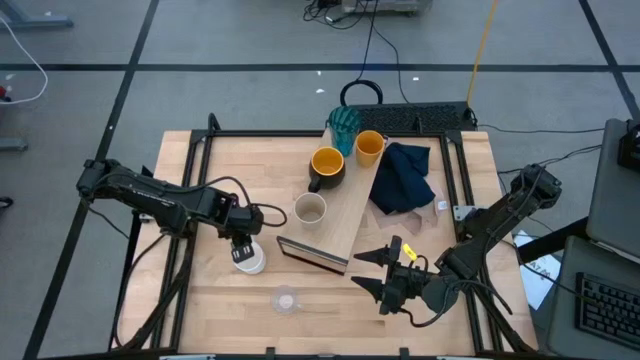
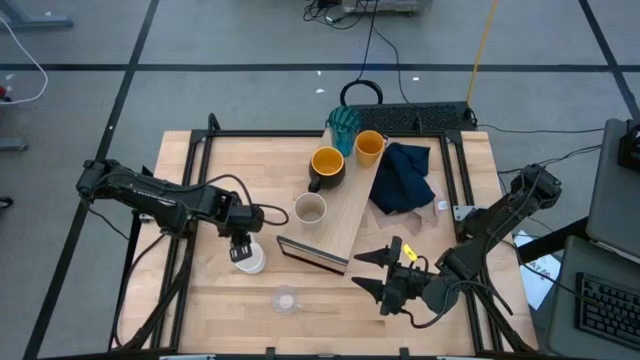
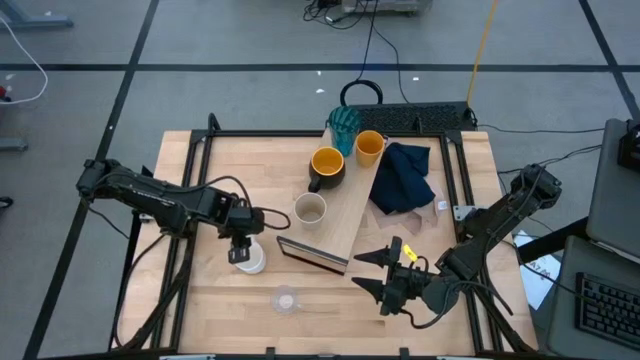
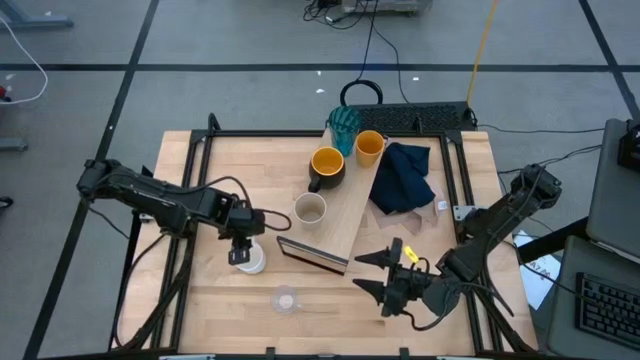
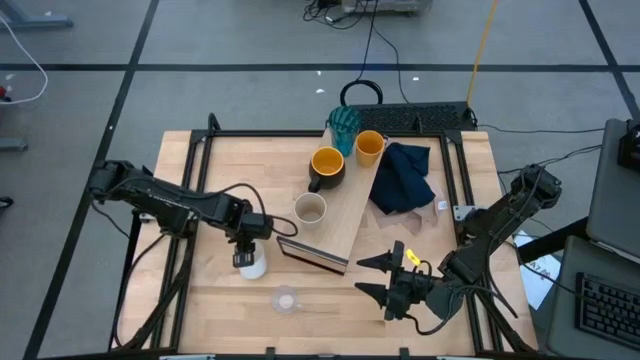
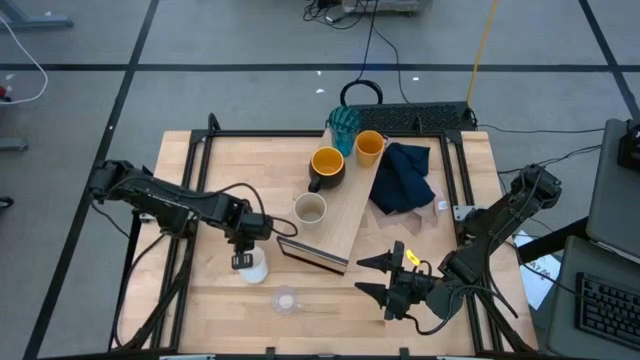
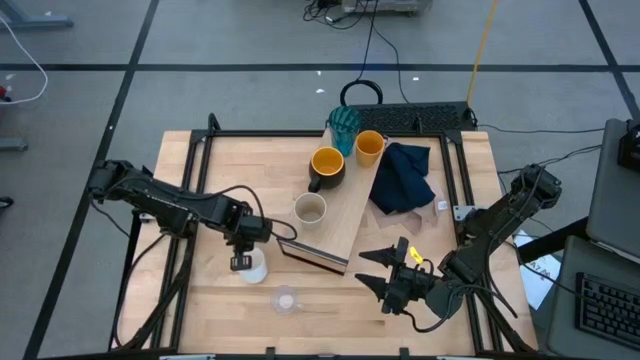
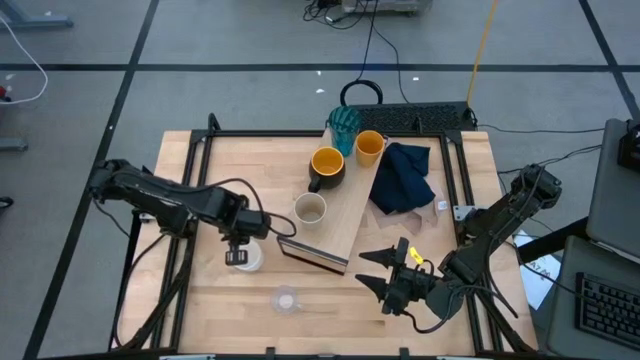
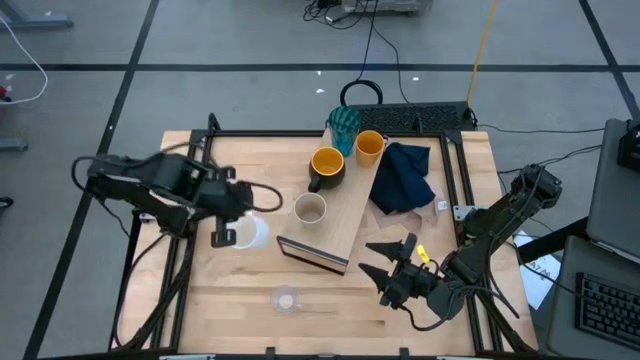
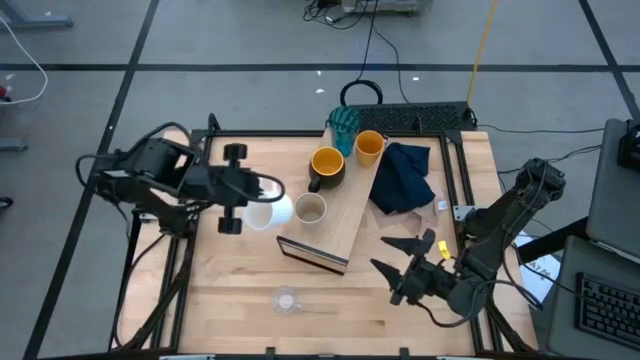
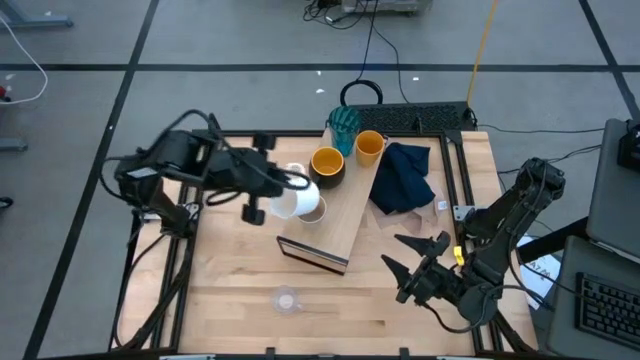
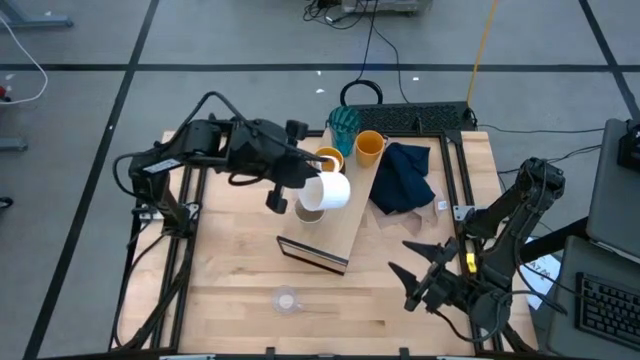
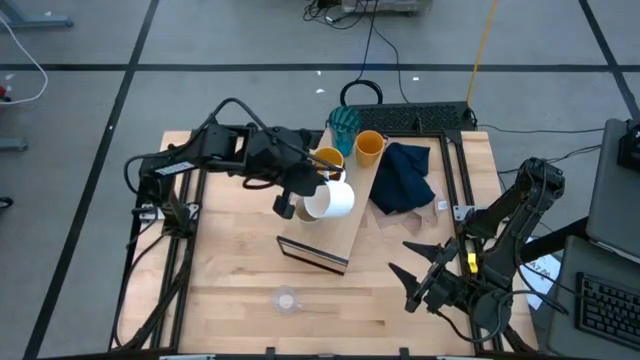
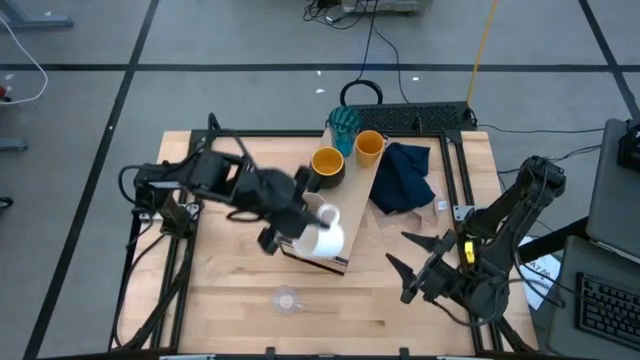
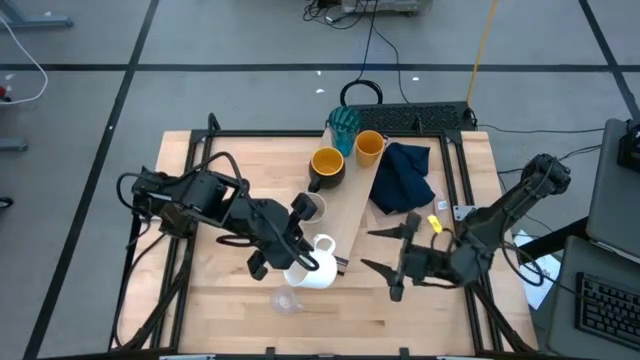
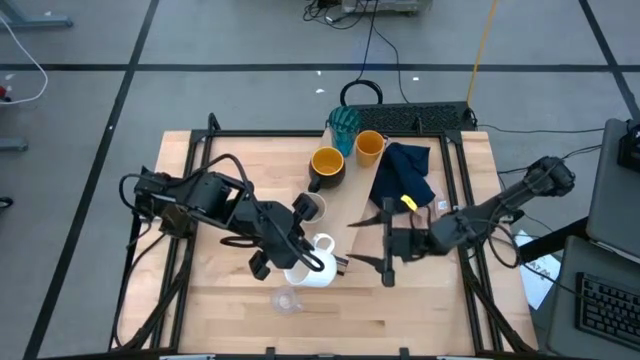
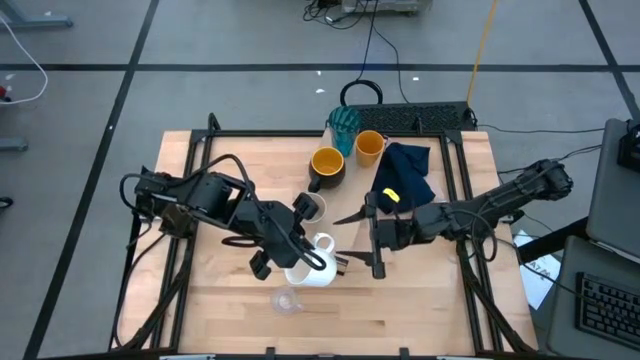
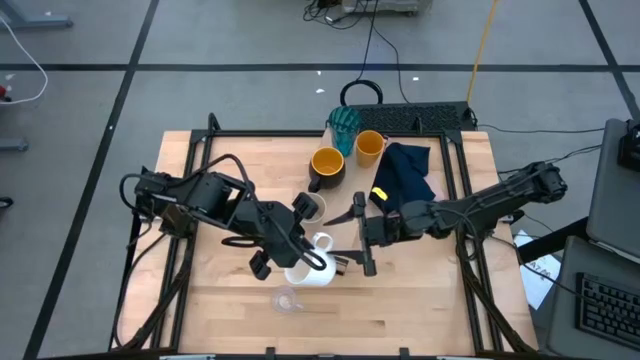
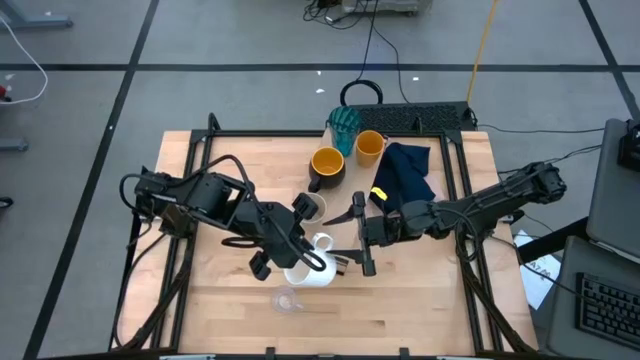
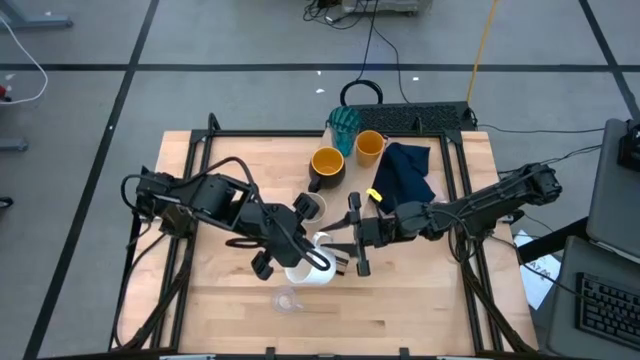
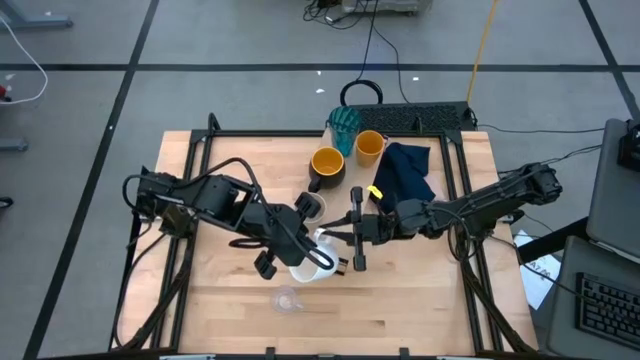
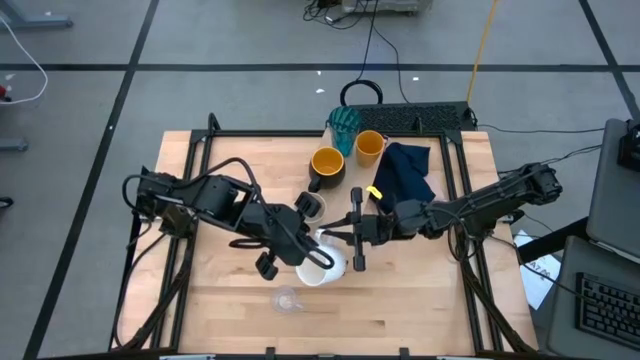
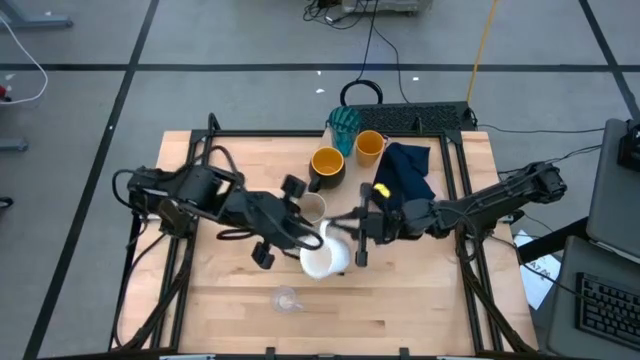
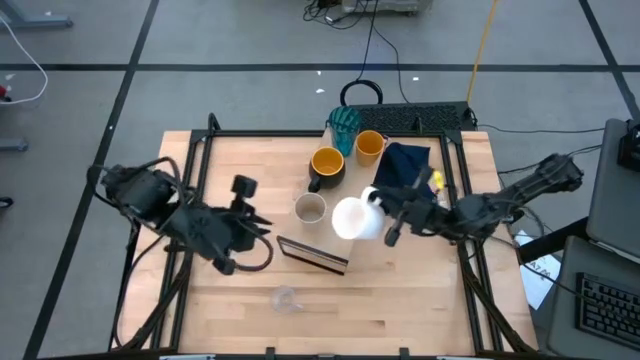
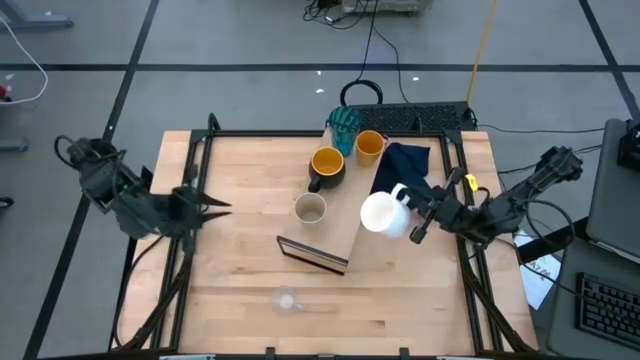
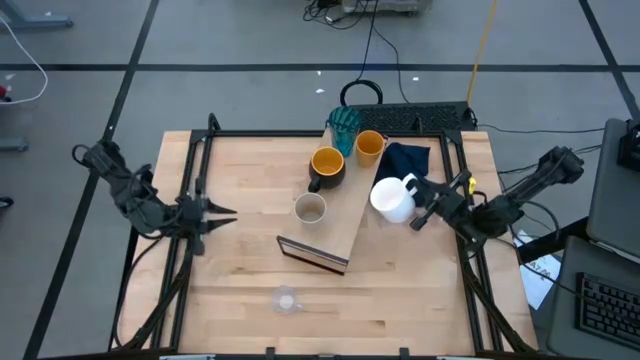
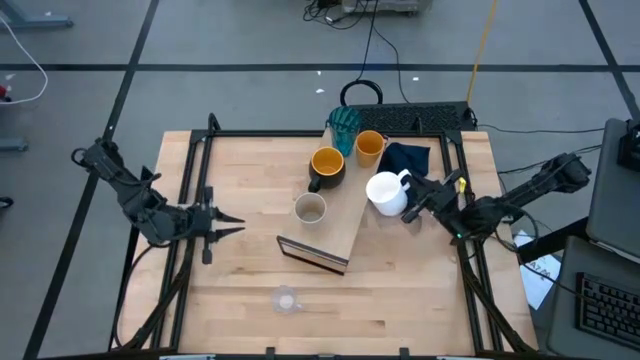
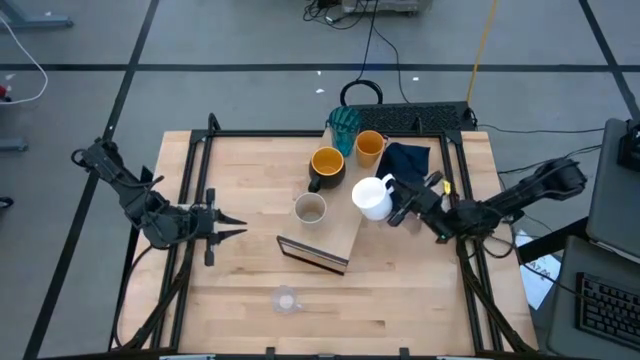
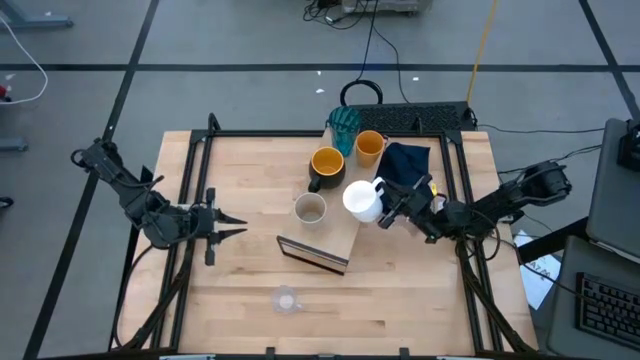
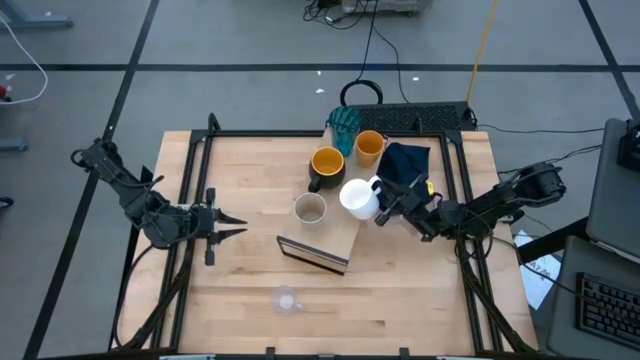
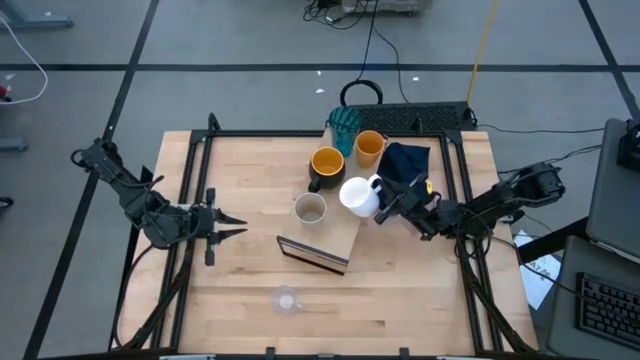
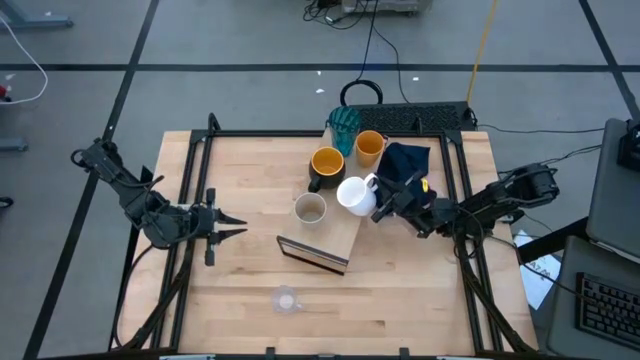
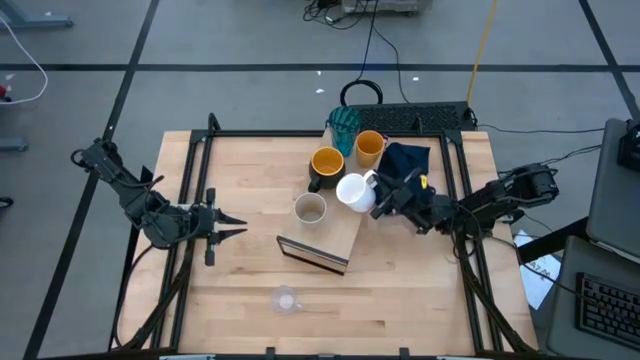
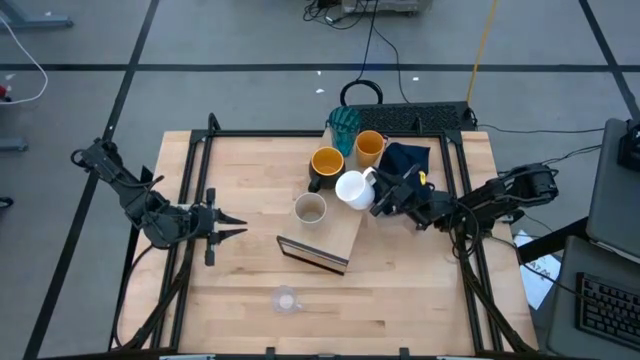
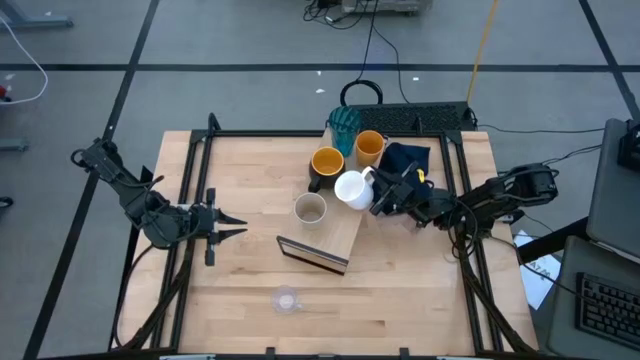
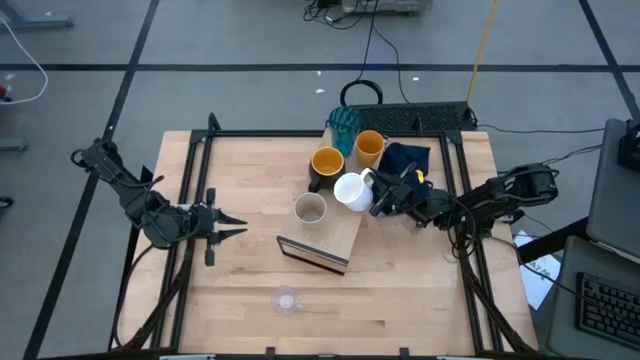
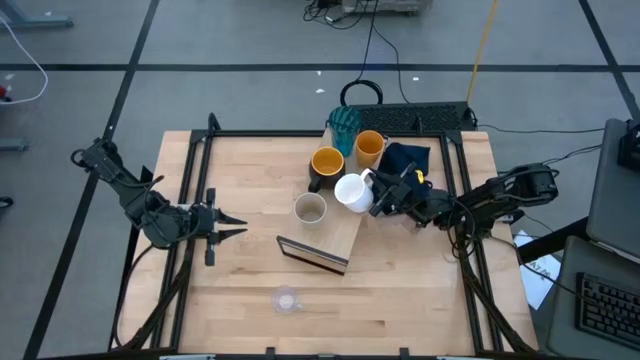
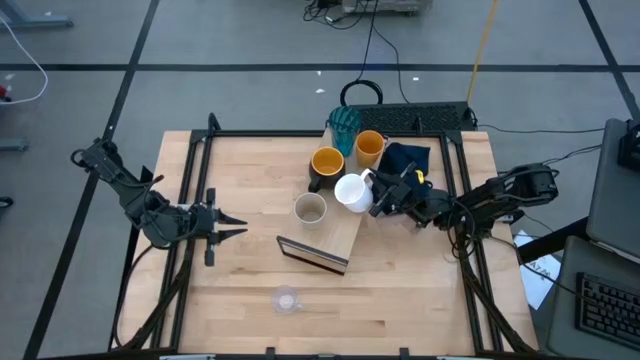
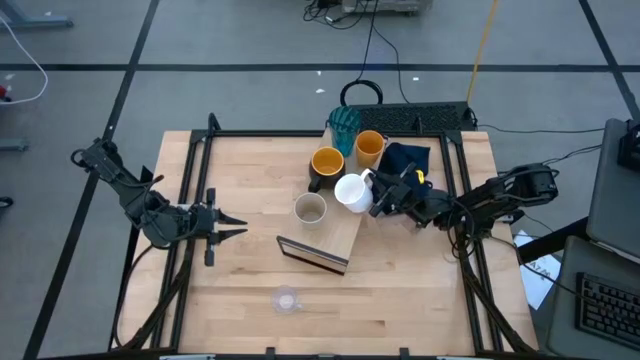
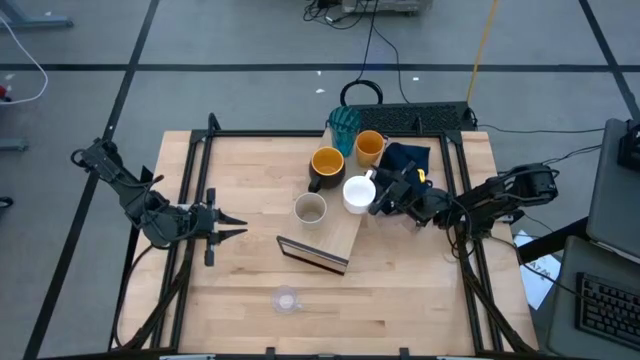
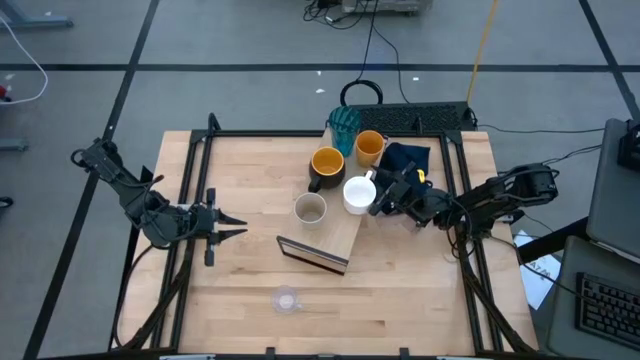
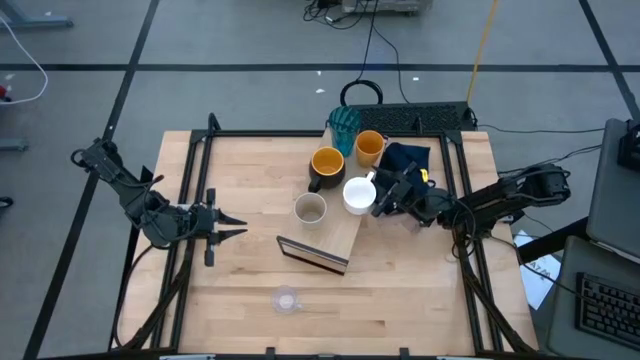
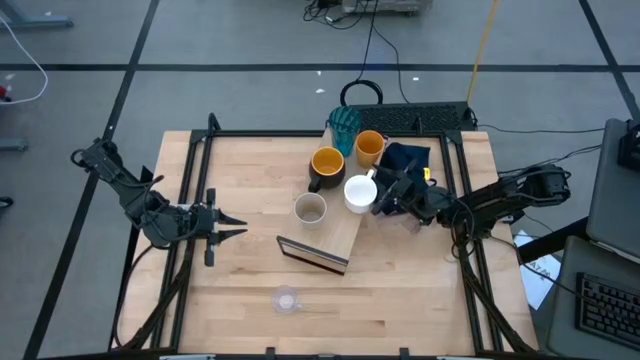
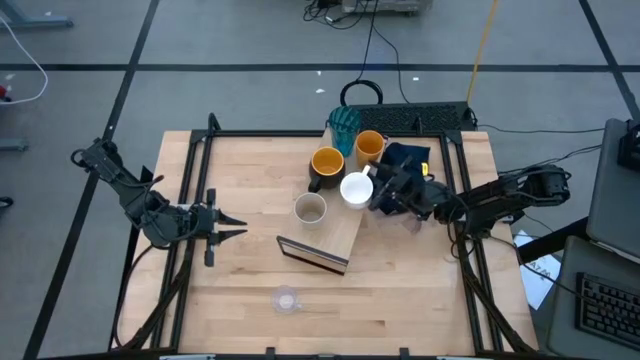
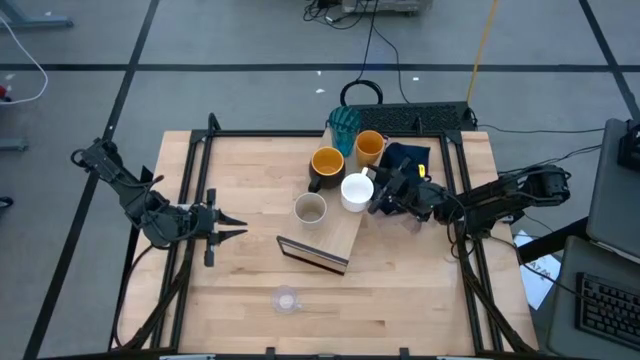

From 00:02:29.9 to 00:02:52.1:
Task: Stack small to large cups/mugs on shelf
Put the white mug on the shelf
